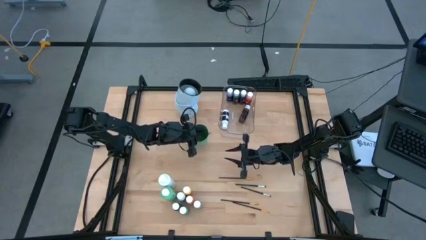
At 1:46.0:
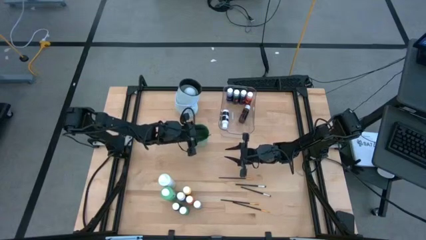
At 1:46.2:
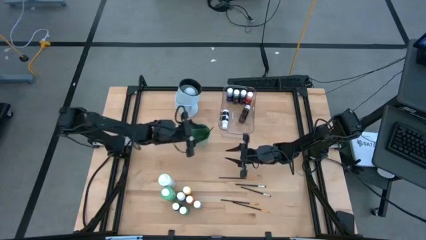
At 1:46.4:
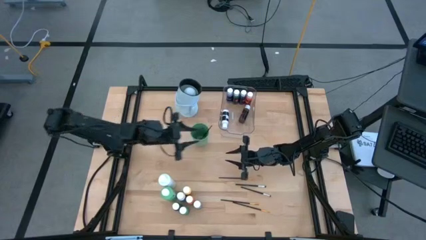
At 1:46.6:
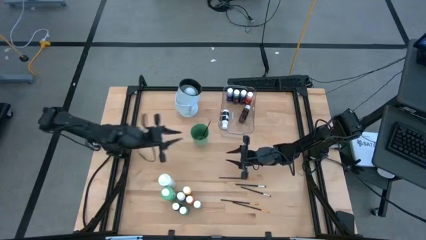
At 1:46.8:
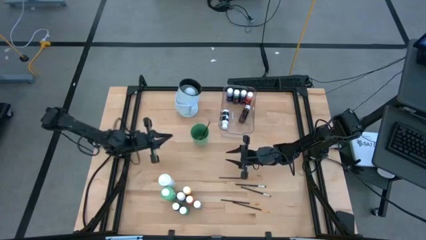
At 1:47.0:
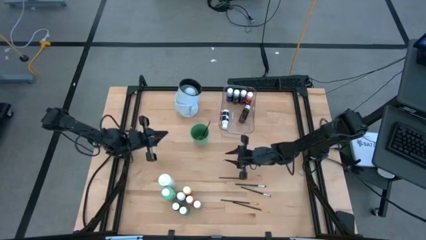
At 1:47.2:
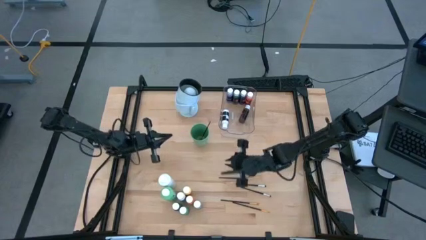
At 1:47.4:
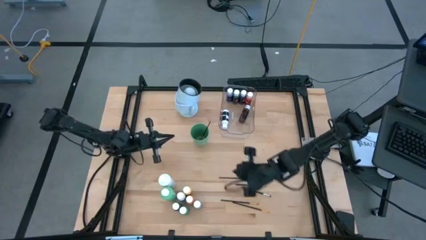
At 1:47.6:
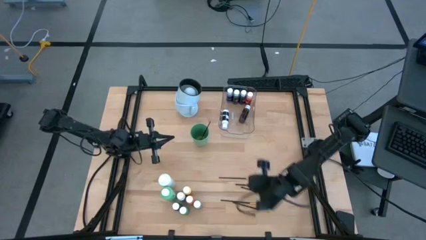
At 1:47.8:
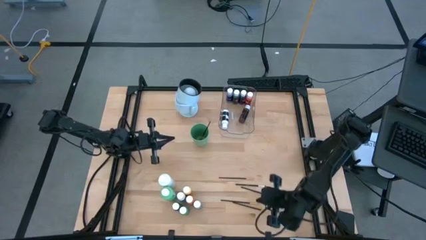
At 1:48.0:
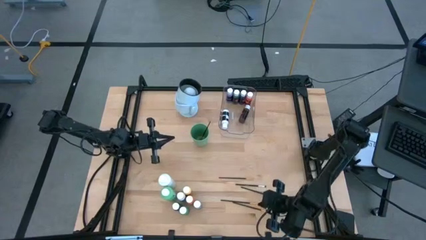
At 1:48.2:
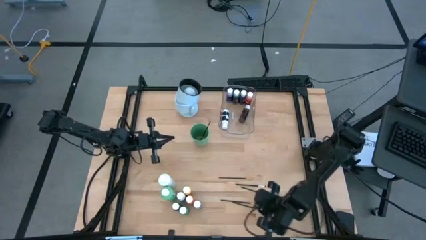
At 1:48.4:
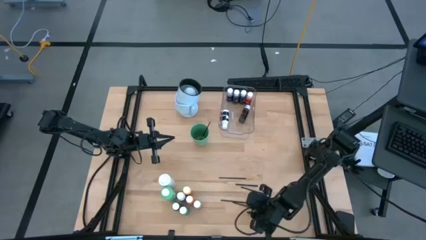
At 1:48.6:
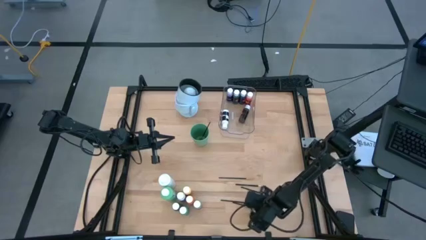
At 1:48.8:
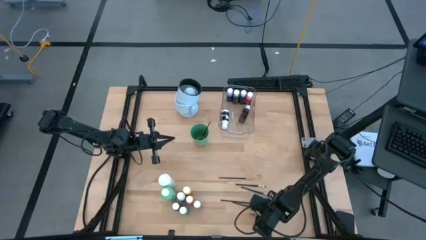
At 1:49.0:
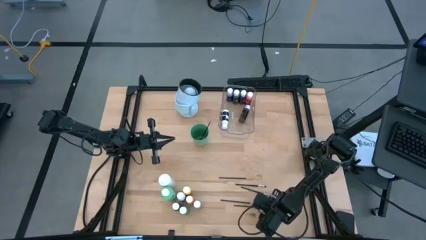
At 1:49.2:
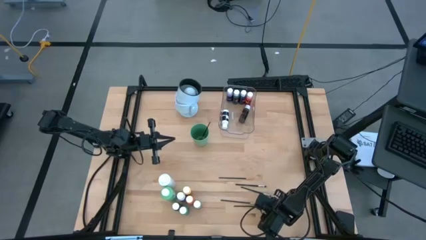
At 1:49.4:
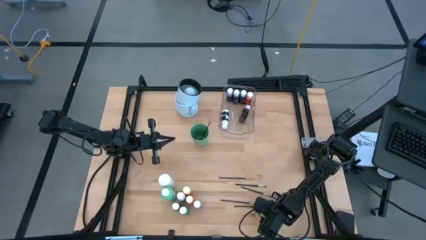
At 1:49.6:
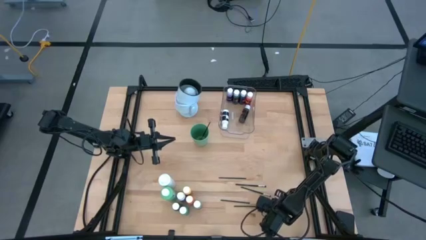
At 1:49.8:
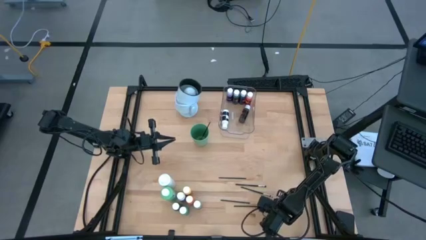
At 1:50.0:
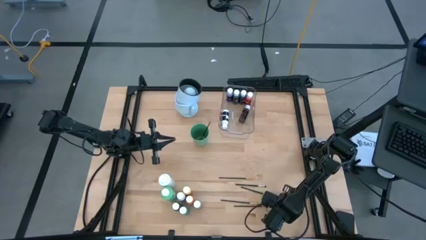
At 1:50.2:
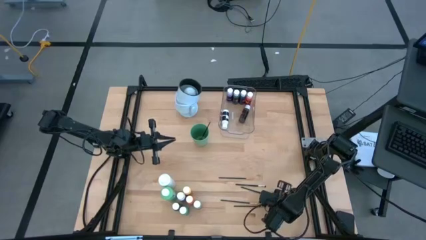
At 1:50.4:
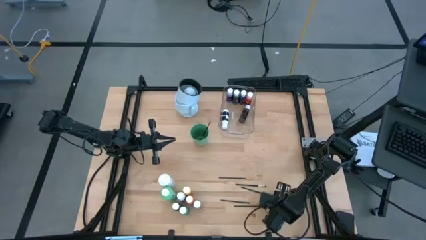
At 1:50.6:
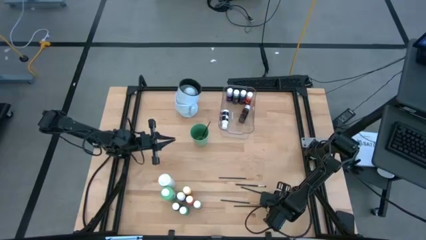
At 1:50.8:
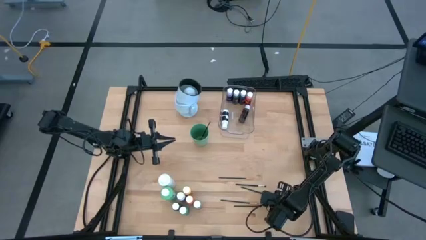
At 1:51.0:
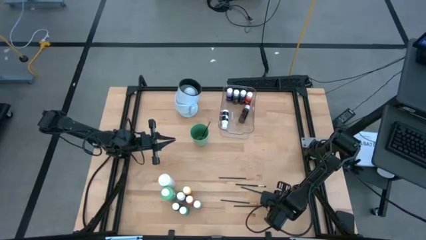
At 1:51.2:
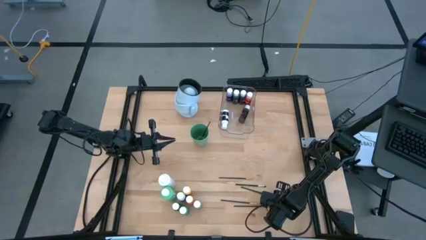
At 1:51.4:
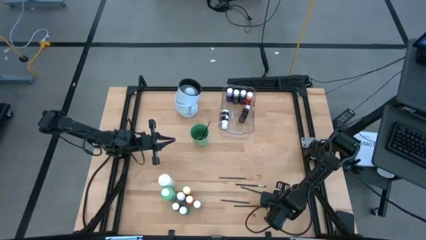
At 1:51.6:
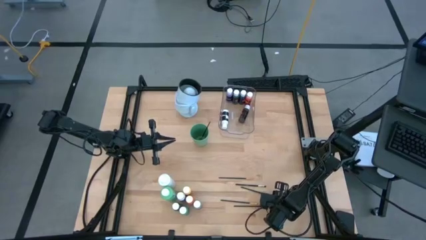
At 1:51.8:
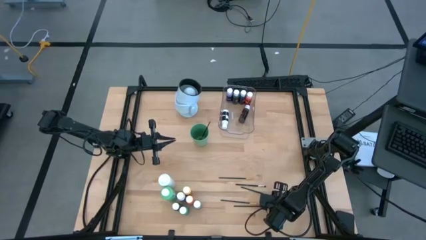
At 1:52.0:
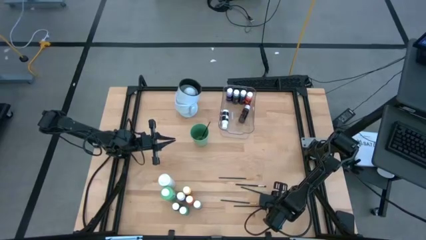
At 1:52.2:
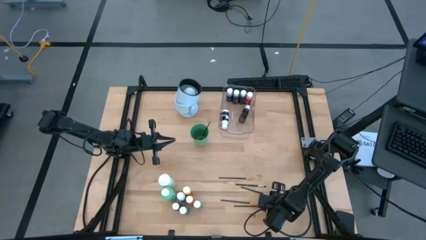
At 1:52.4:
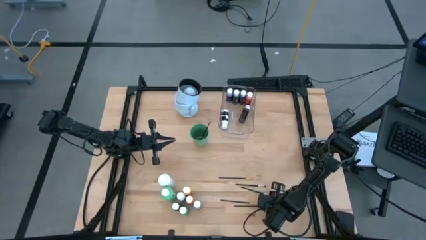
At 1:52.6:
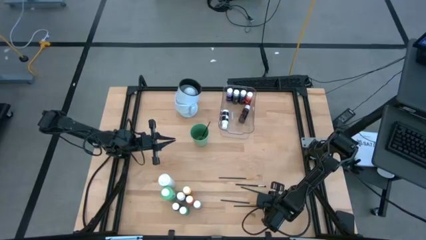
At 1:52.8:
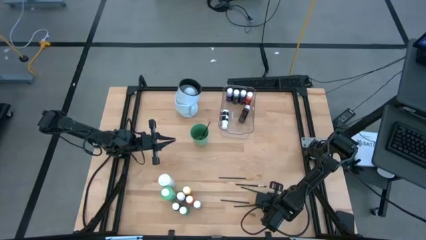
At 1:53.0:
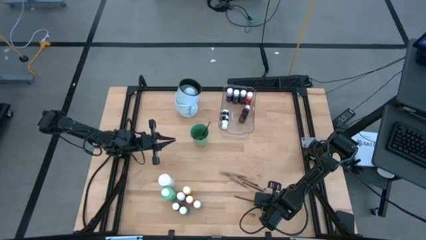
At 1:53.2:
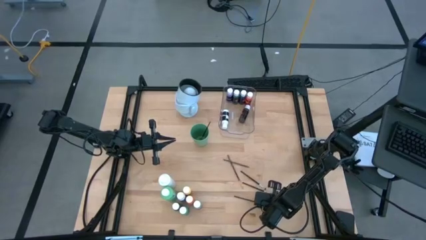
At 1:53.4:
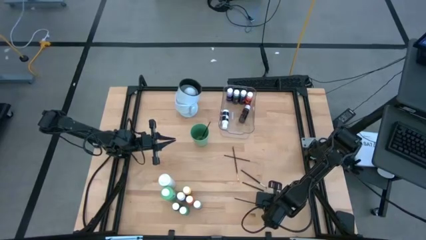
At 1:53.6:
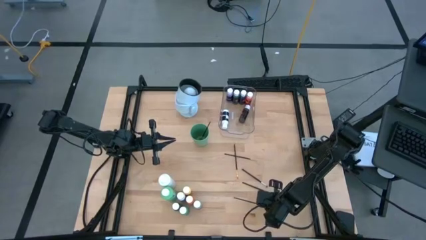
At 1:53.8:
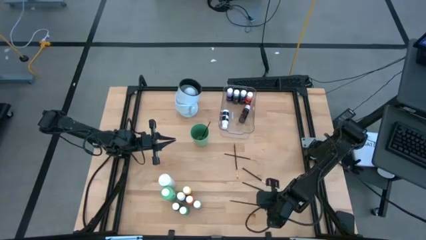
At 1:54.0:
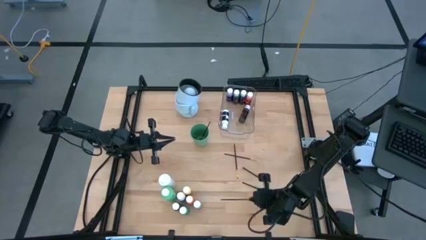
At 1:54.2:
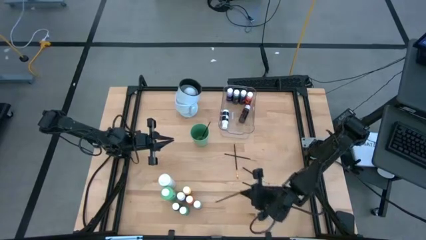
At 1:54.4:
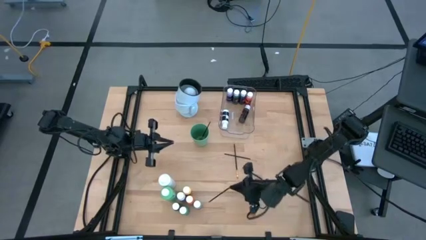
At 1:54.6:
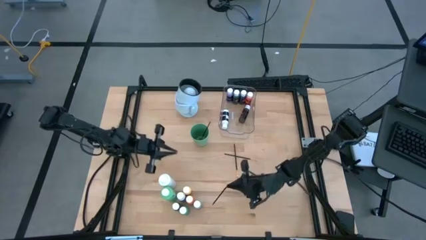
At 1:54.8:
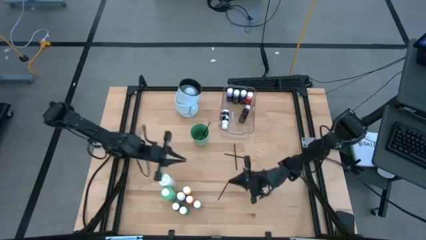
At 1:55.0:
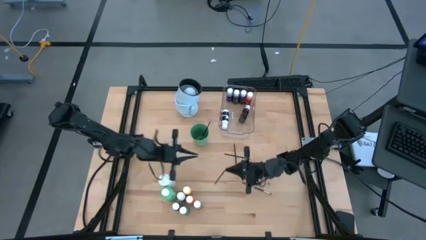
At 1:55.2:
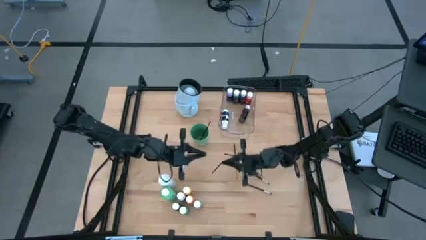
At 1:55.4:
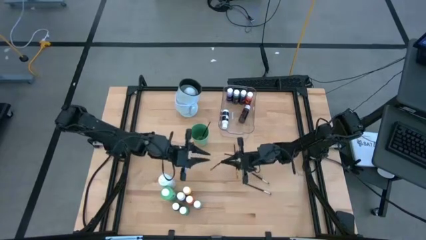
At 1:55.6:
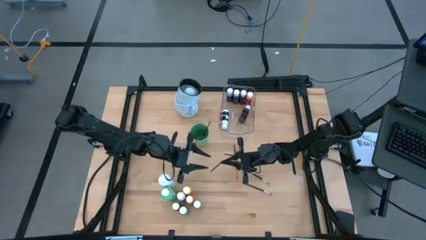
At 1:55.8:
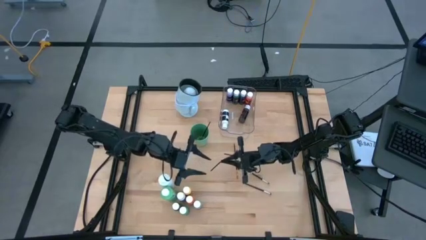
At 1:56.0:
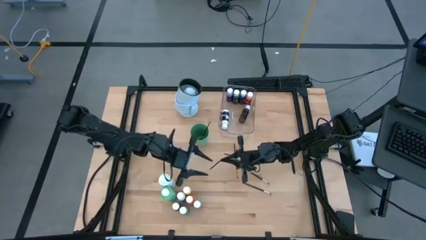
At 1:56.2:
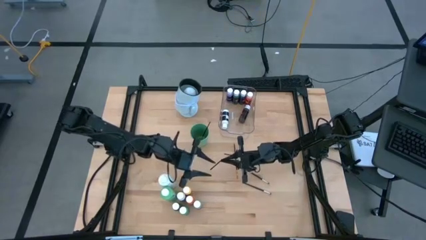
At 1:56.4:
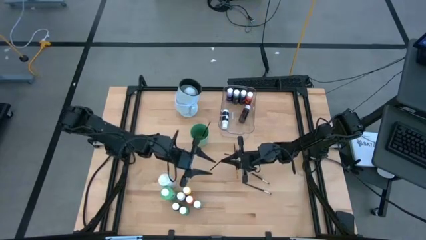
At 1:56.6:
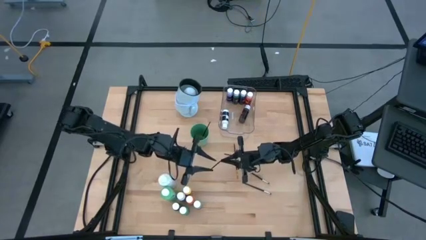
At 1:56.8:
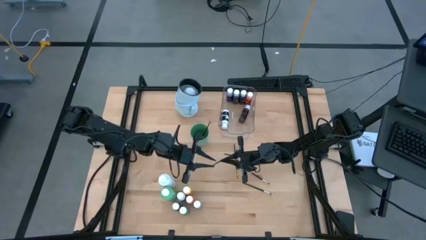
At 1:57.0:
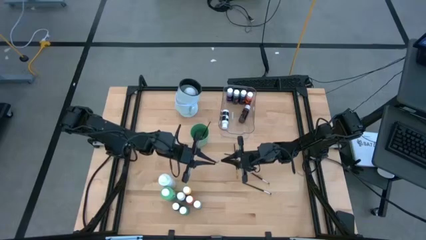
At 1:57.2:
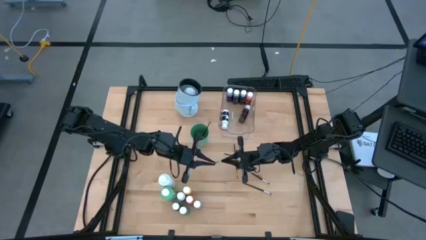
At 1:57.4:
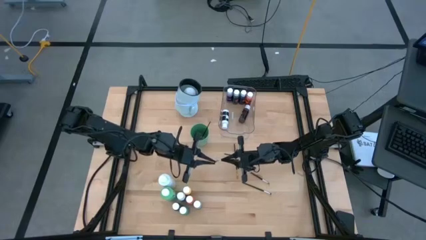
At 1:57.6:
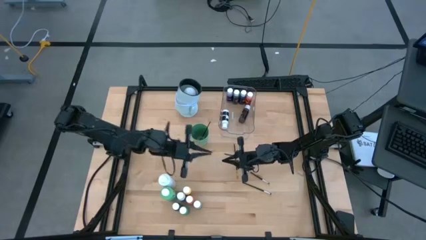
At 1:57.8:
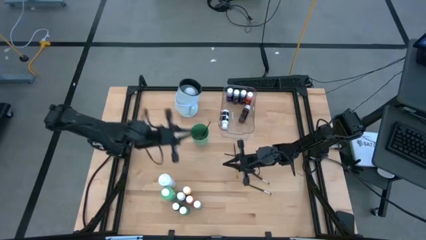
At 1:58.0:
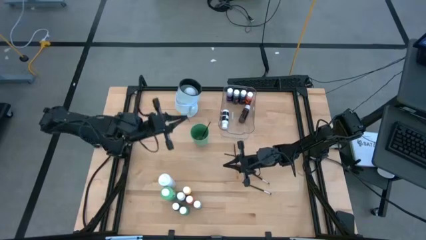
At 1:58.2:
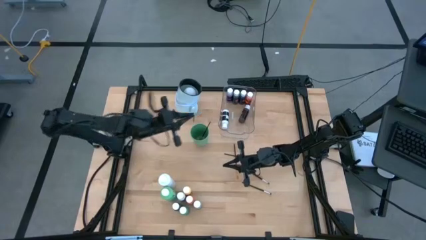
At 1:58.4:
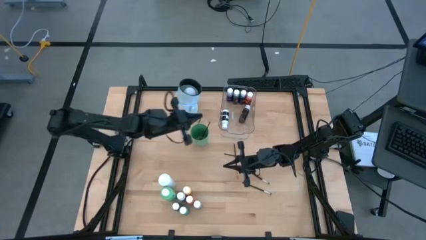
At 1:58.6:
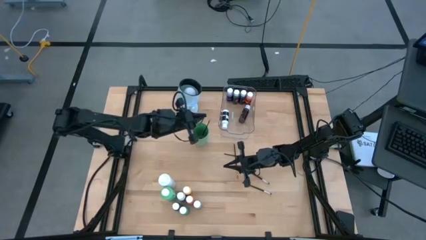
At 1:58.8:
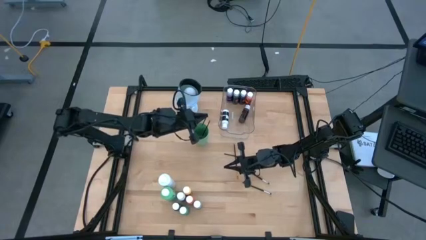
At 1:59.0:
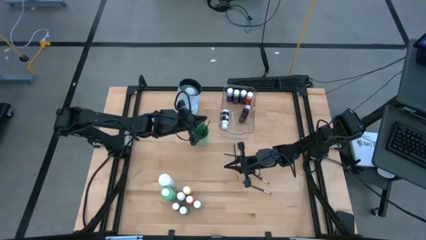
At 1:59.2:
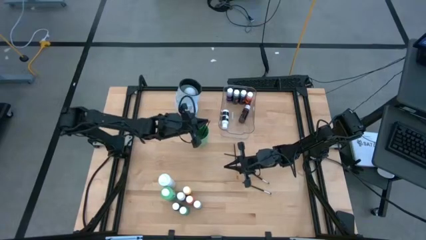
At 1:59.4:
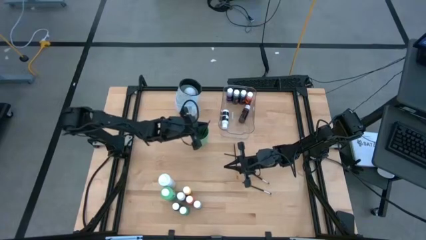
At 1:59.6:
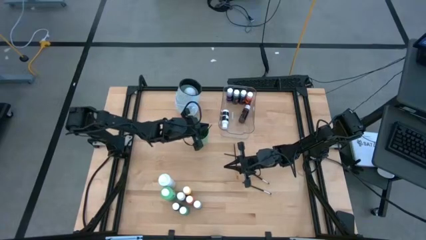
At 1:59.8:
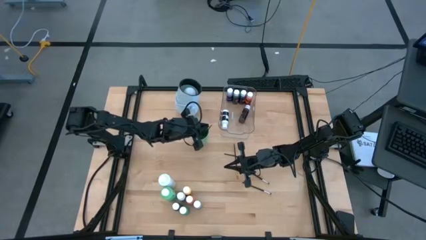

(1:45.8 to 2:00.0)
Task: Pick & Place Paint Supplies
Put the gold paintbrush into the green cup
